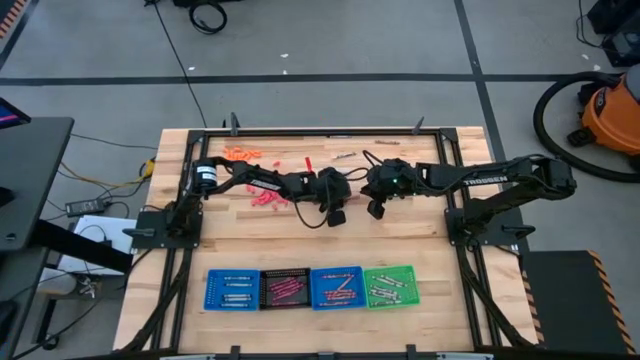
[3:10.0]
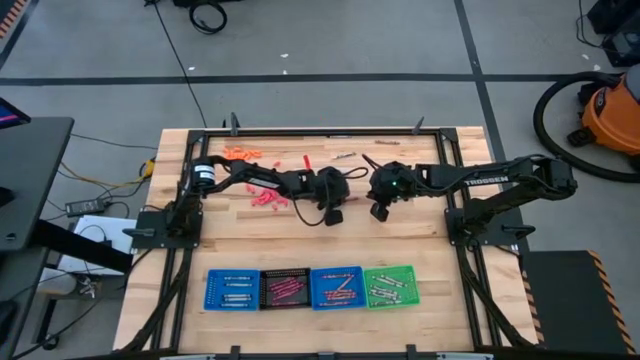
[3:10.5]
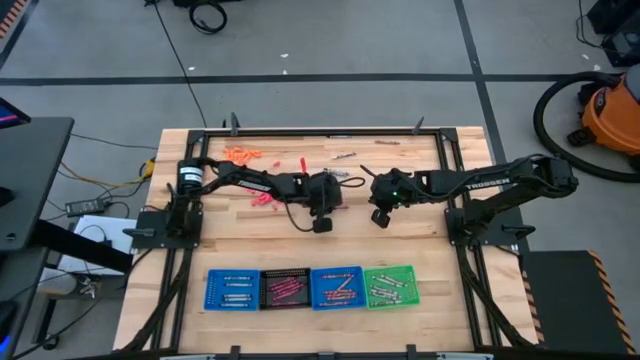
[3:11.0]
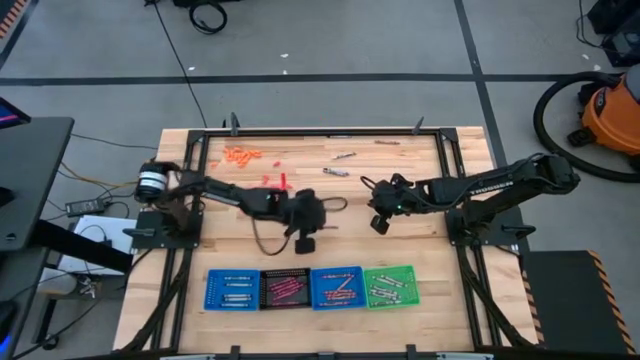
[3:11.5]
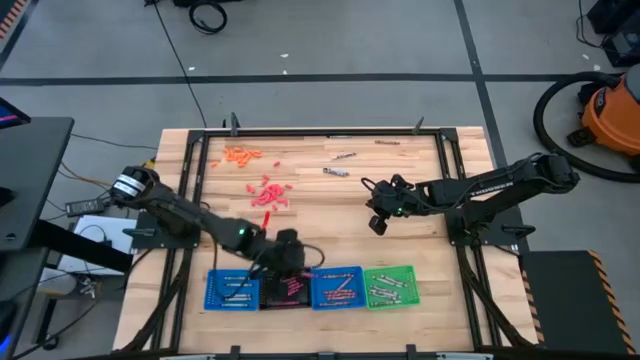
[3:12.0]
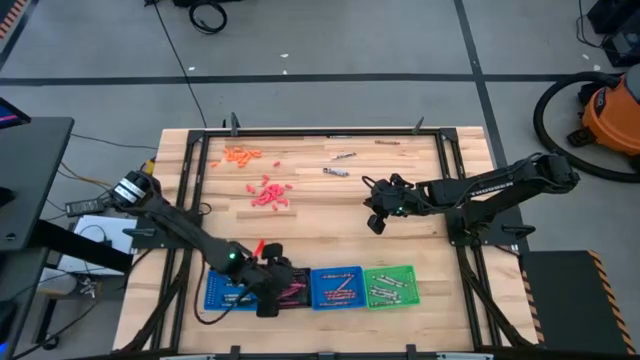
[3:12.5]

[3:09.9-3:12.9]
Task: Sort crayons
Put the dark pink crayon into the black bin

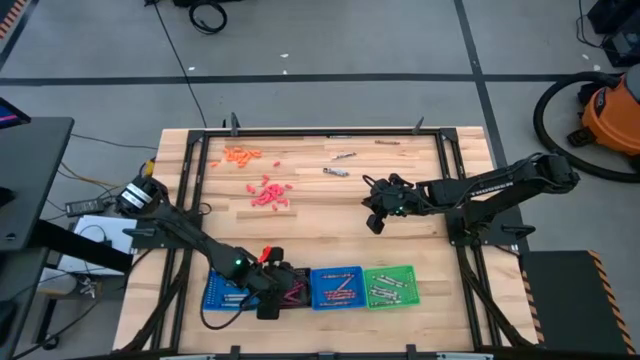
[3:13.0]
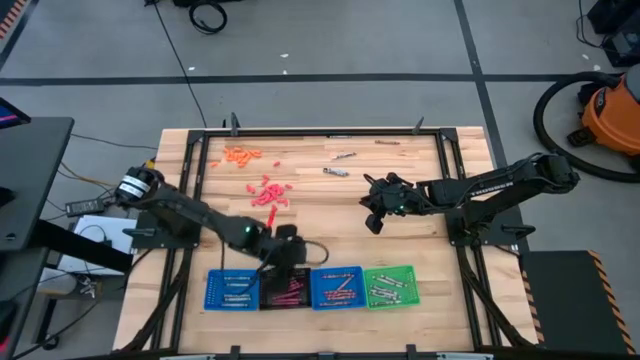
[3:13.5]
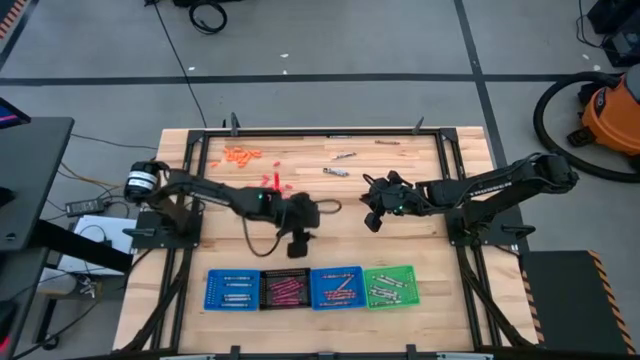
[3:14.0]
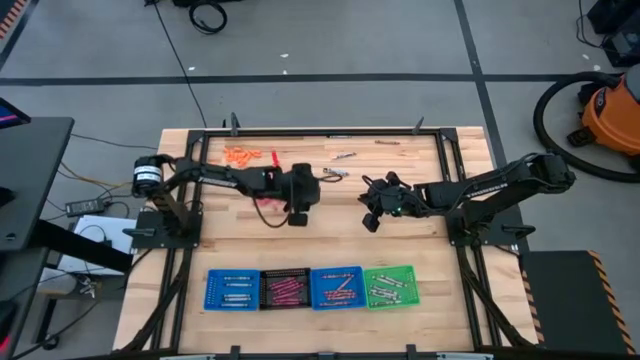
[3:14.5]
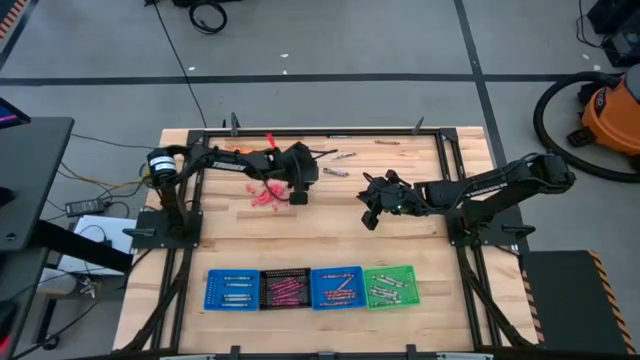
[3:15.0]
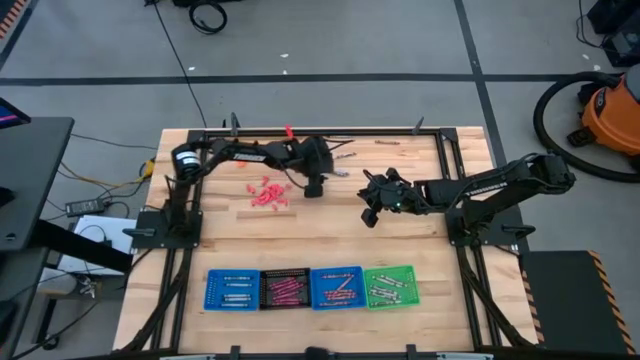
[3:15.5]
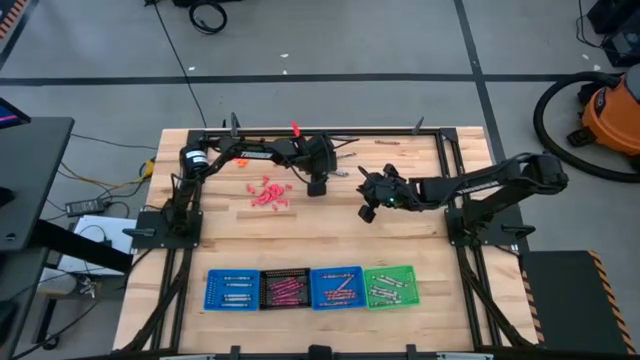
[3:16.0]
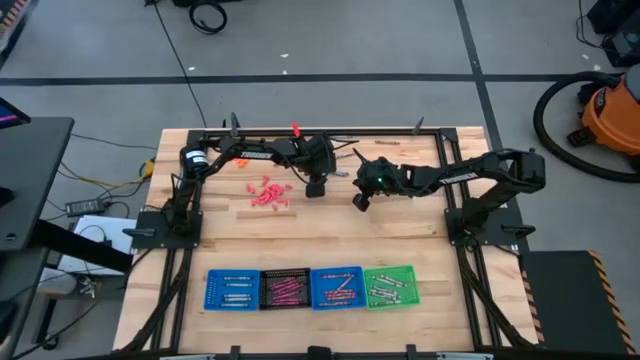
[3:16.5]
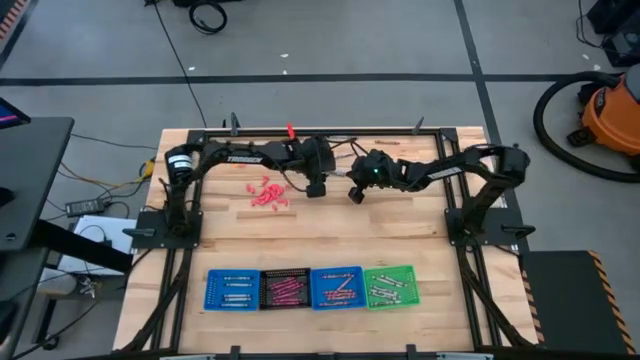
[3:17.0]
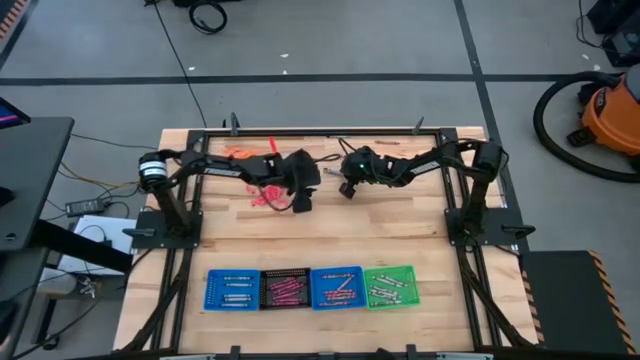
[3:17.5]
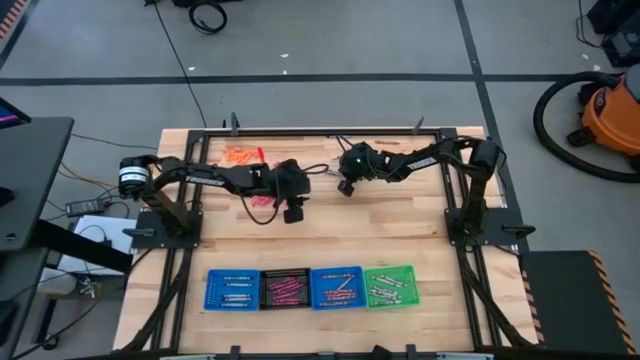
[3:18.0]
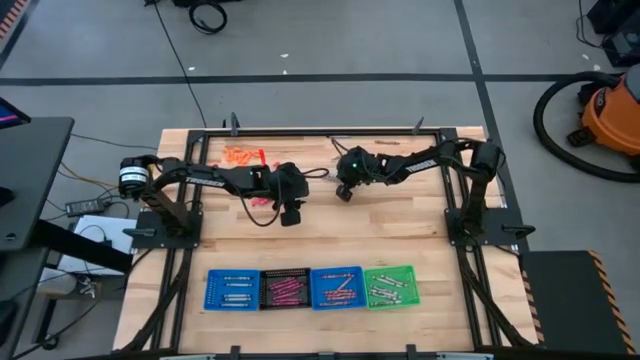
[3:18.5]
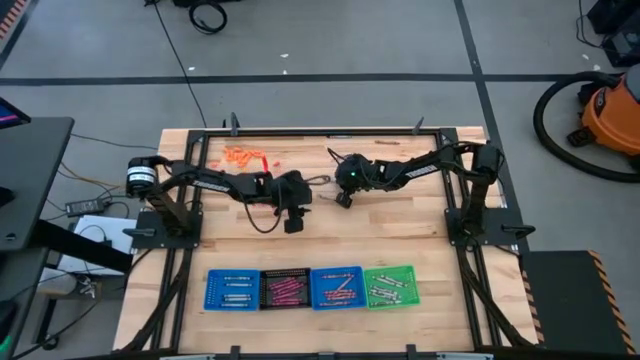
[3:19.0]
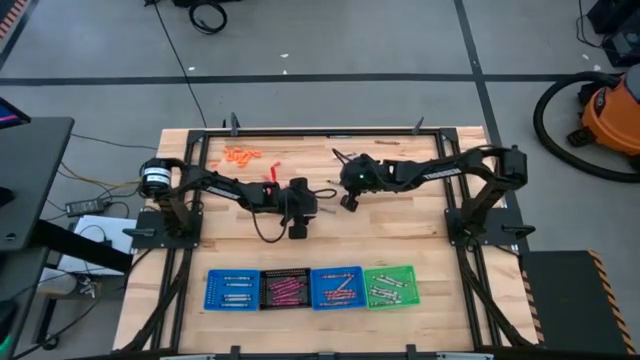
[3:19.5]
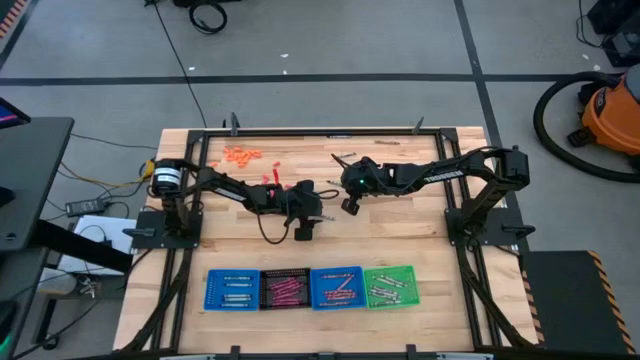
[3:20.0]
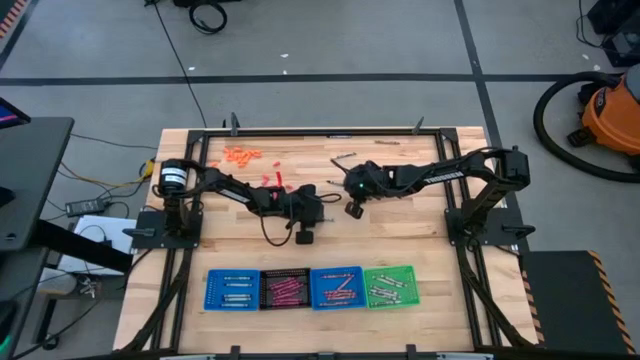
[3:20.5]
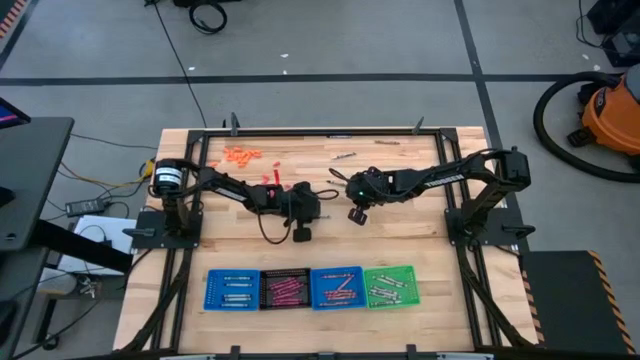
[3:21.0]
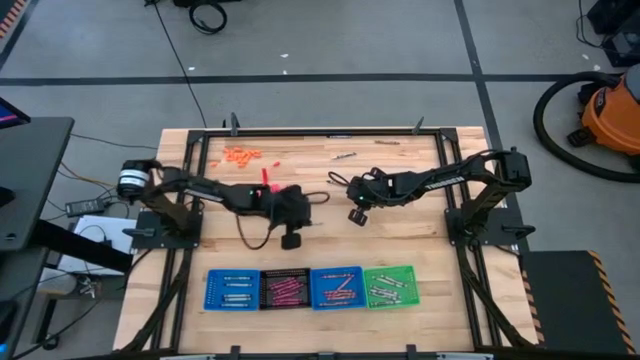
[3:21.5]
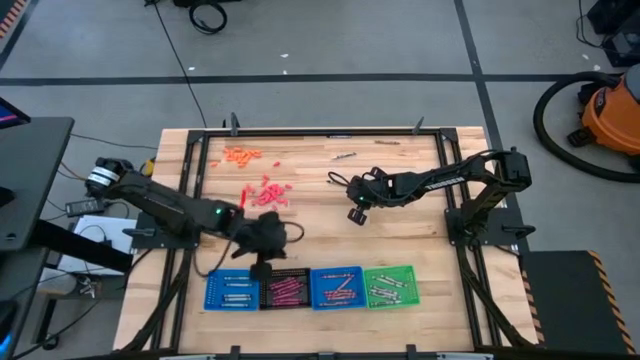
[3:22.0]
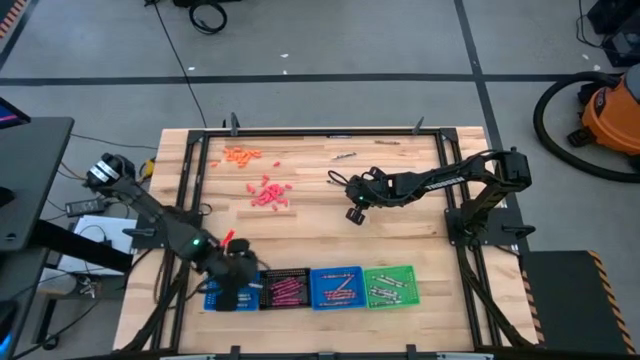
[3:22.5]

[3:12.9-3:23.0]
Put the black crayon into the left blue bin

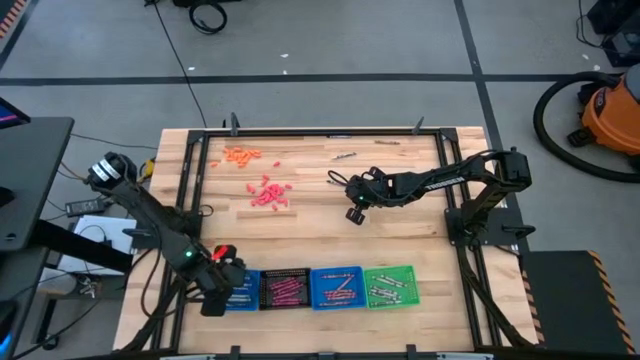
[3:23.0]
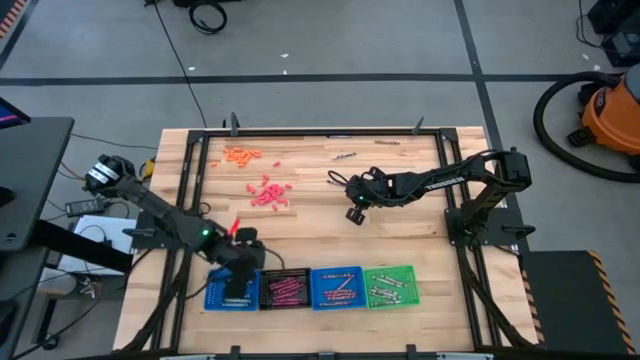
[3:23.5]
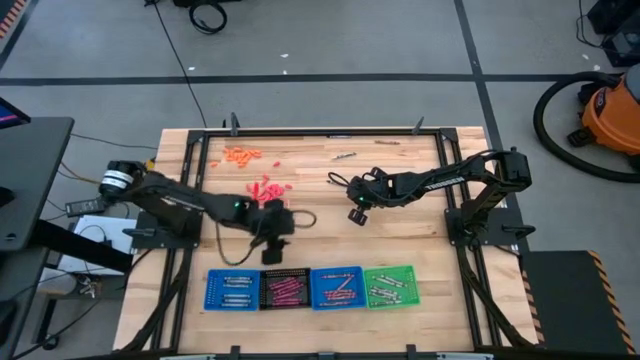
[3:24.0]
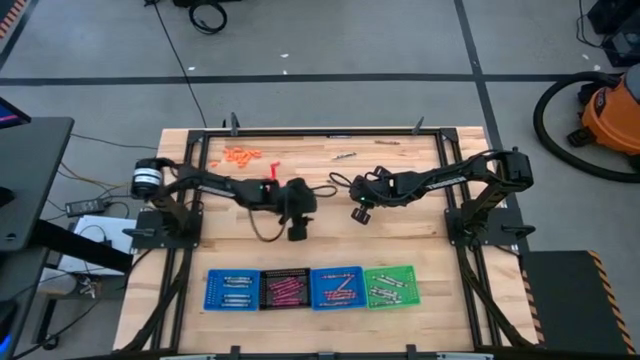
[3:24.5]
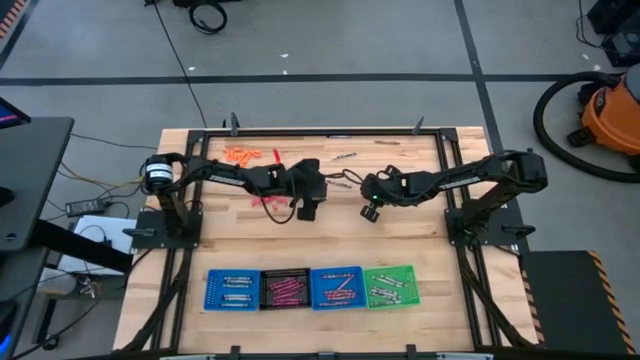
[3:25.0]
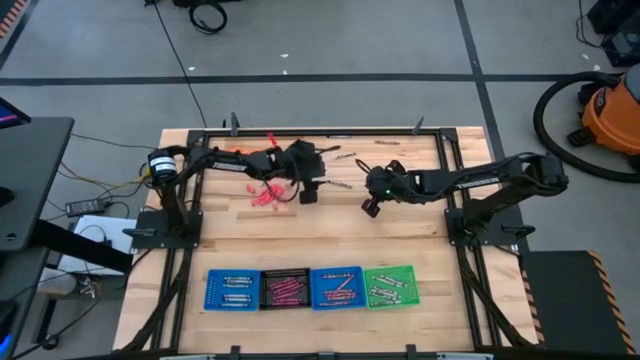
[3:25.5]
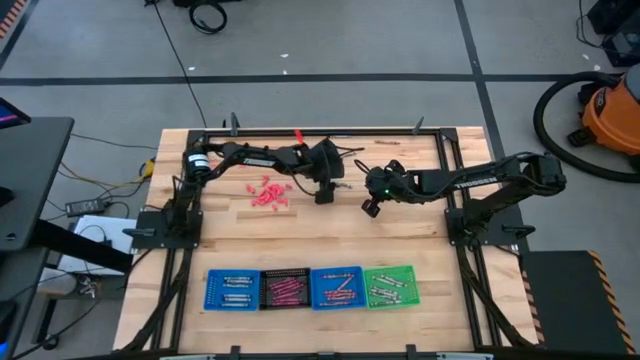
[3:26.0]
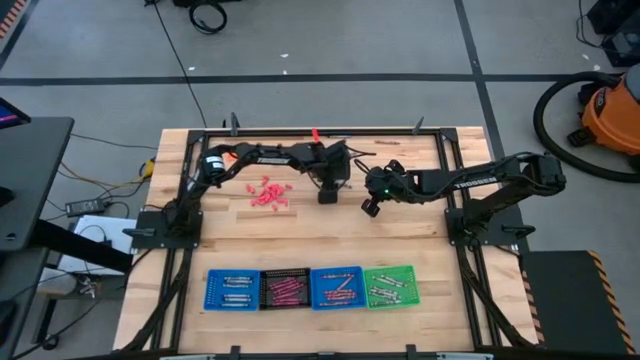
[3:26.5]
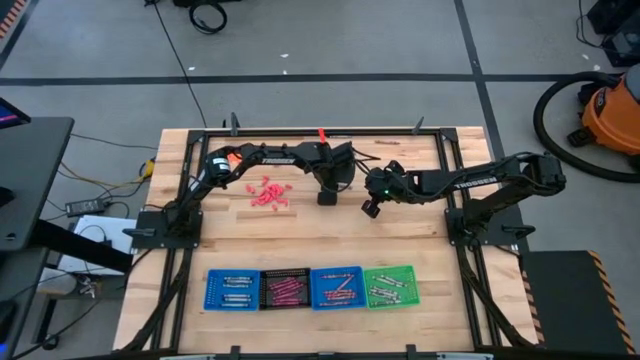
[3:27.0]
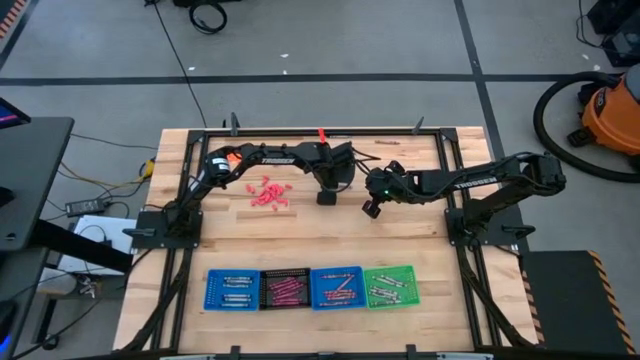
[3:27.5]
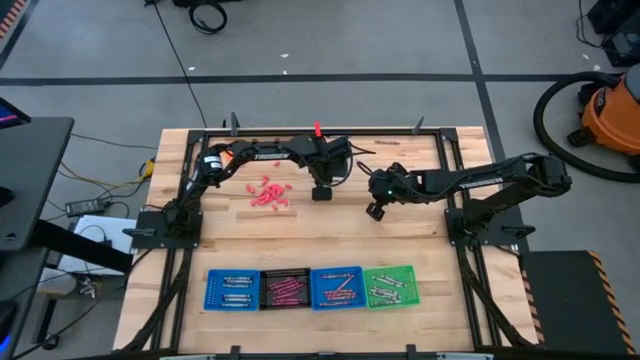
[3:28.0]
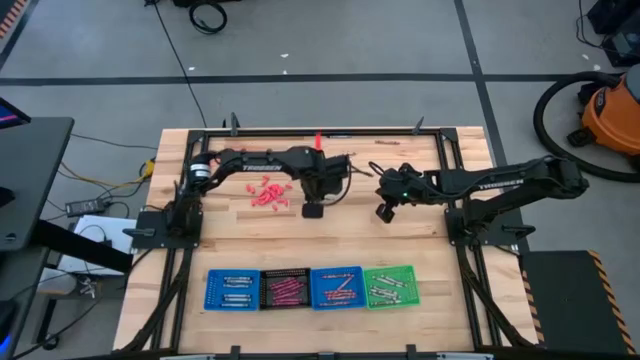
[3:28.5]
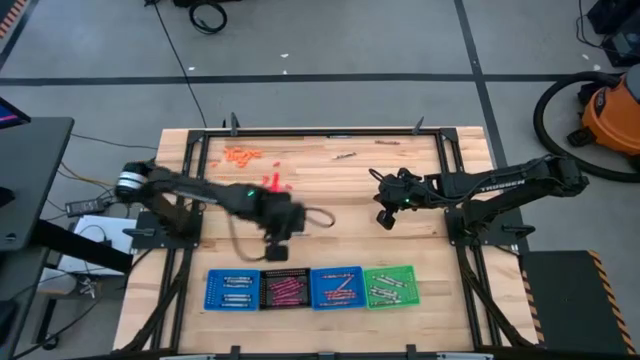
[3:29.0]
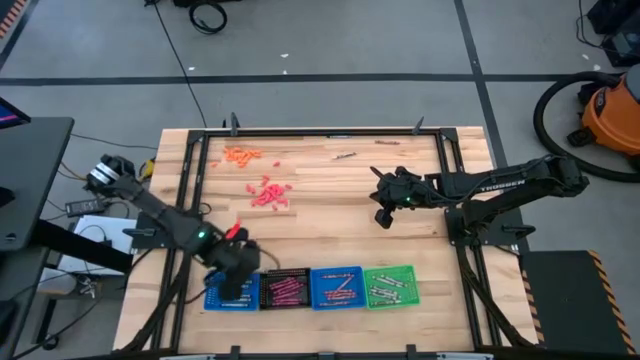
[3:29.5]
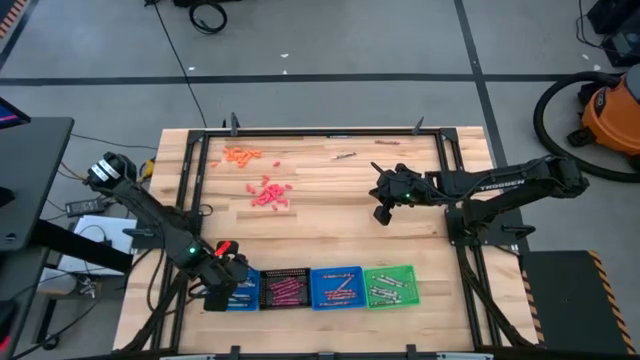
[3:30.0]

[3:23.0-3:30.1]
Put the black crayon into the left blue bin
